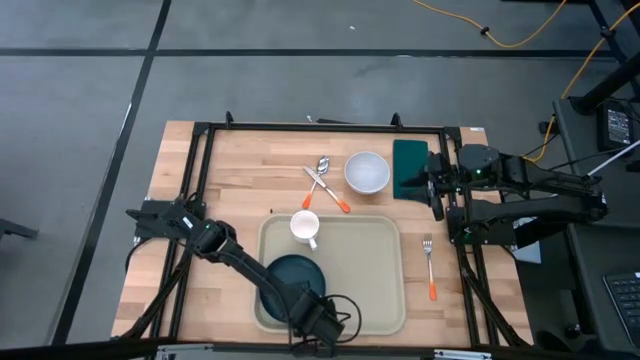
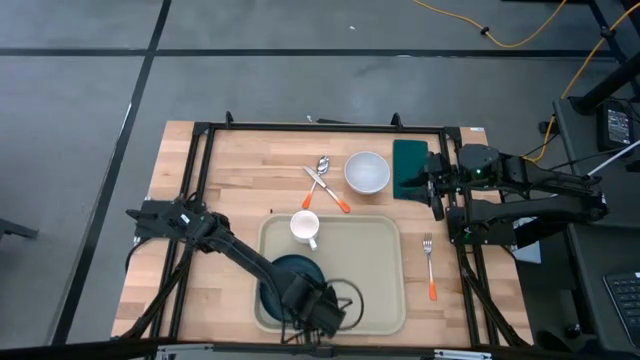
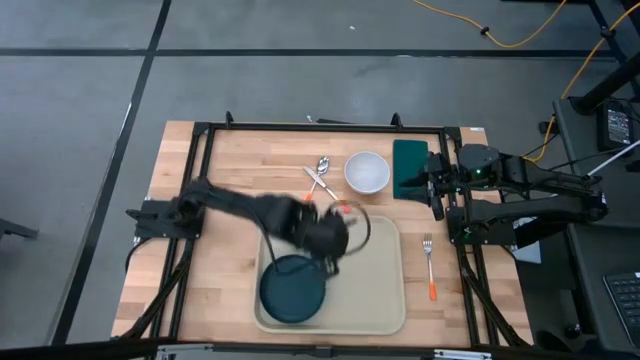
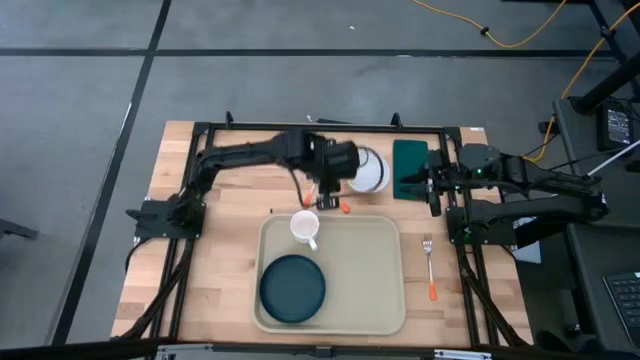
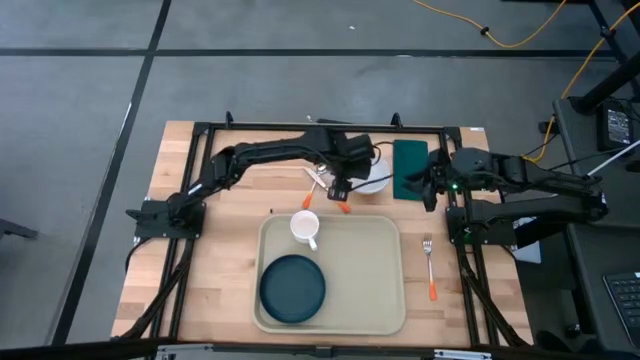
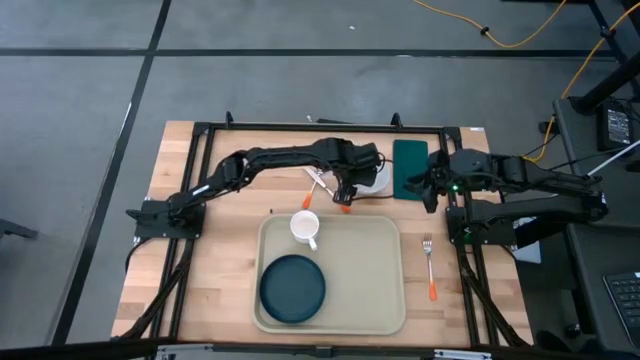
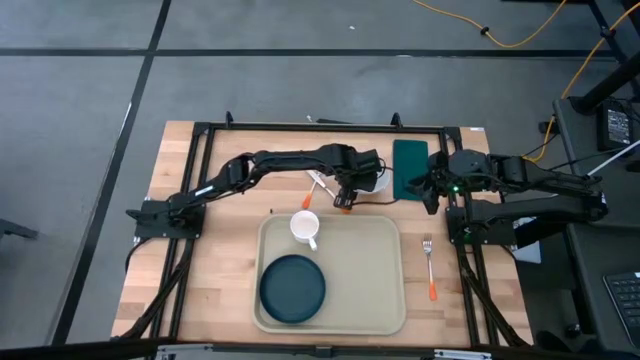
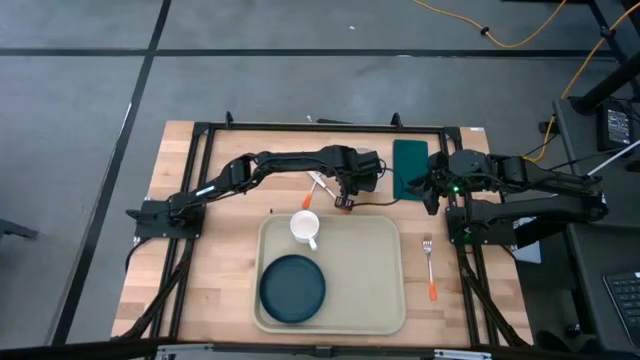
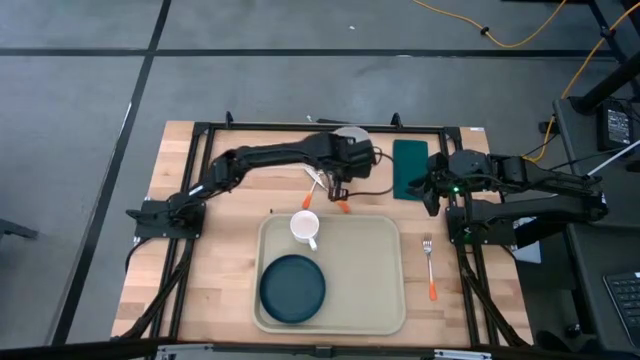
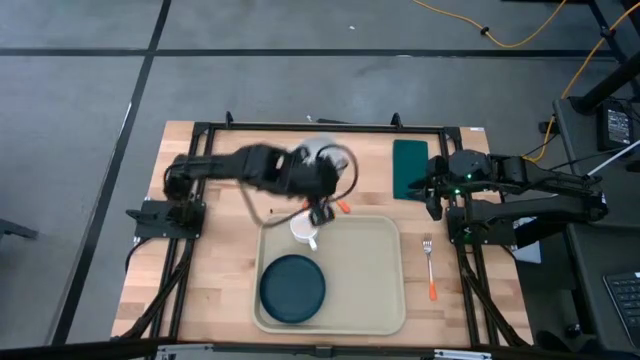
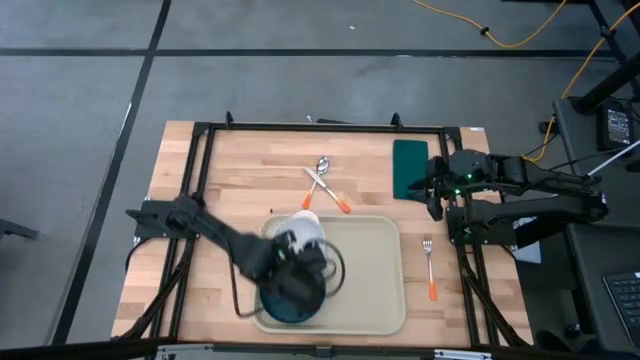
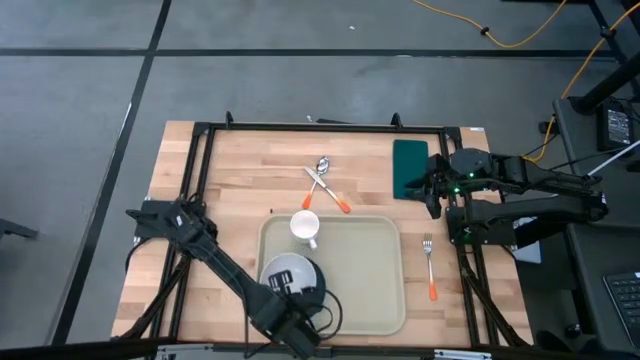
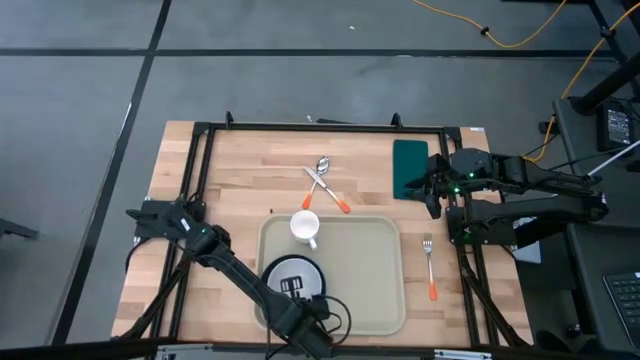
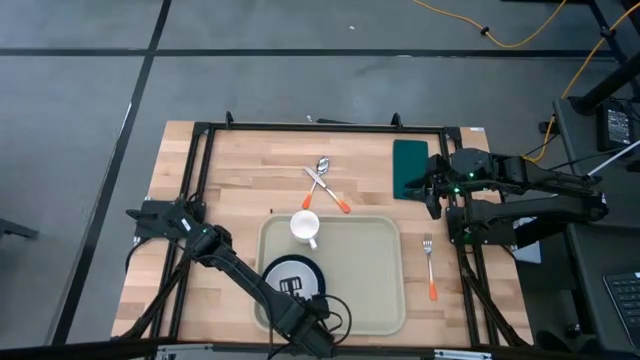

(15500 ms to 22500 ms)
Task: Set up tray
Put the white bowl on the black plate

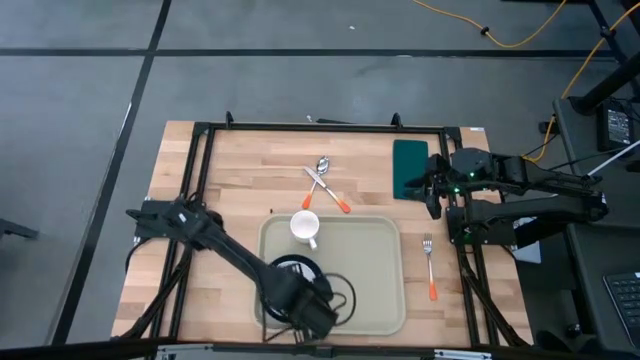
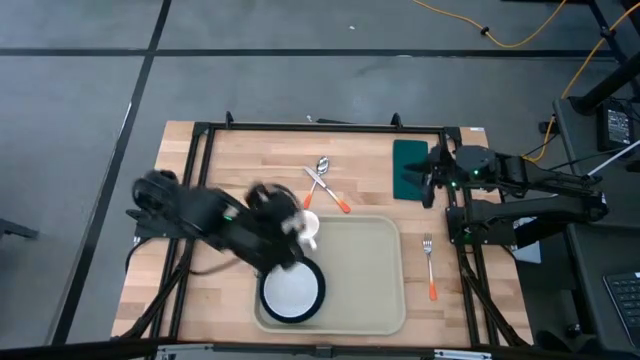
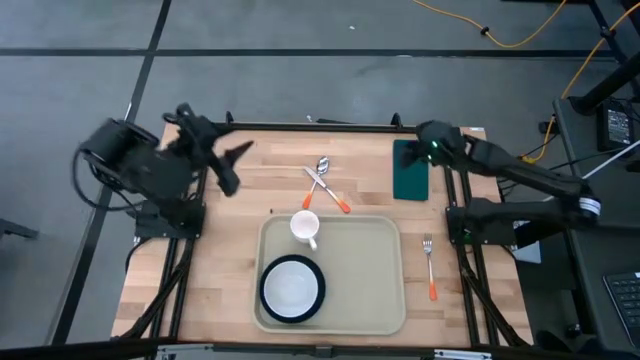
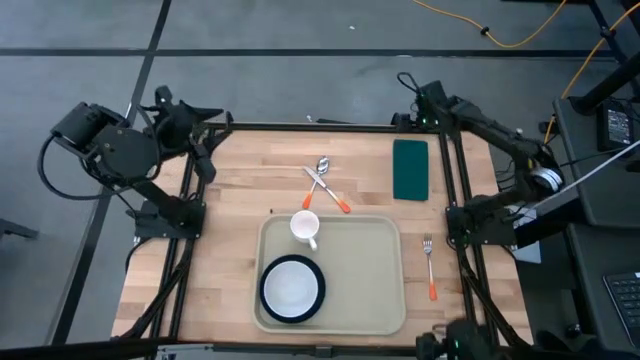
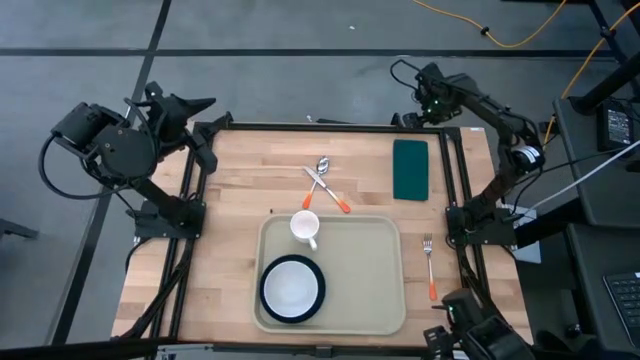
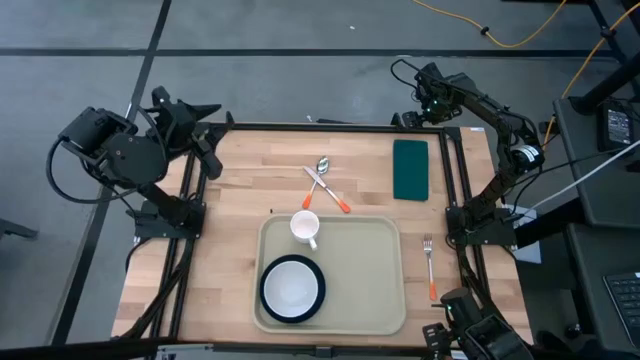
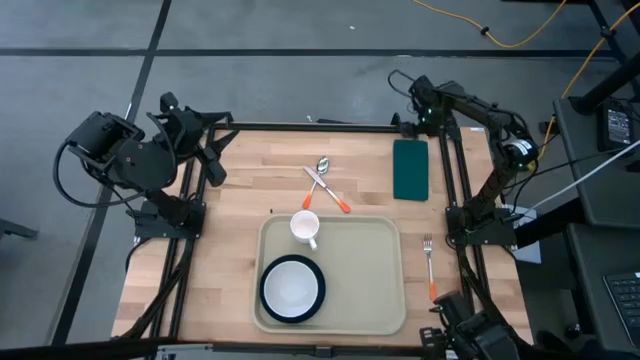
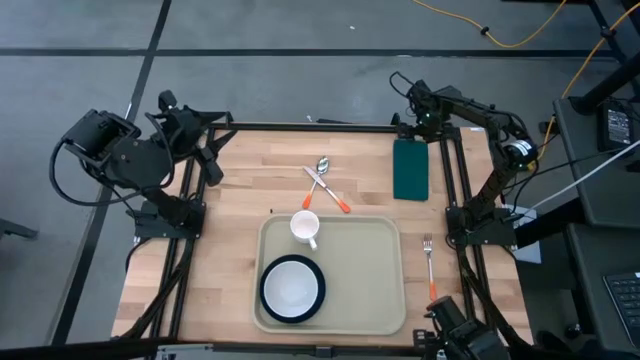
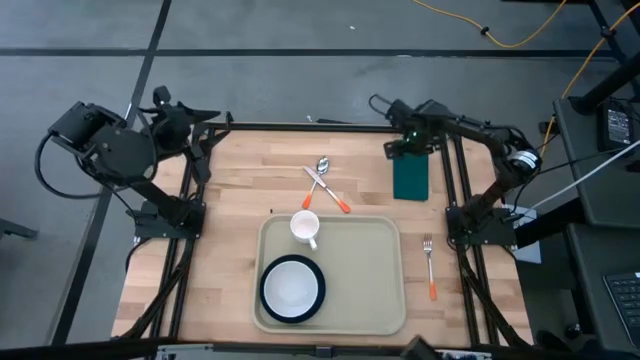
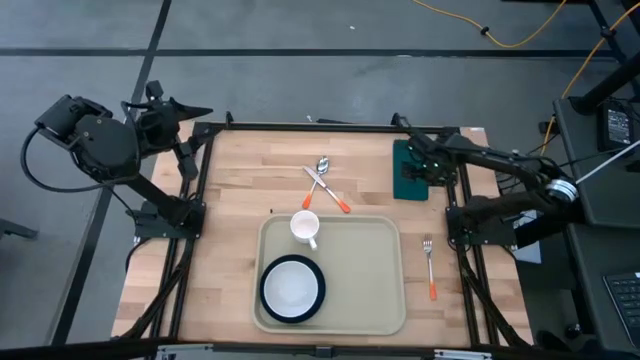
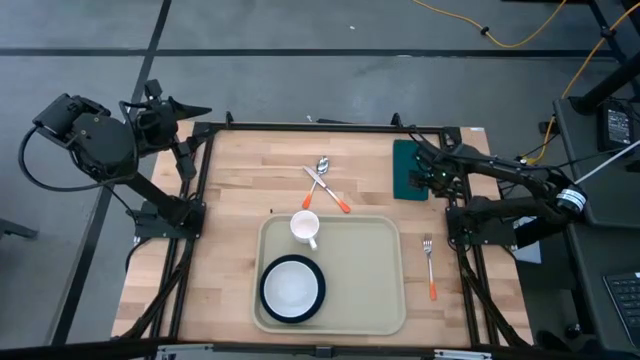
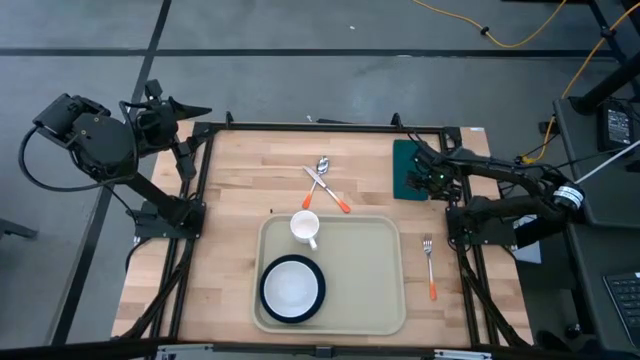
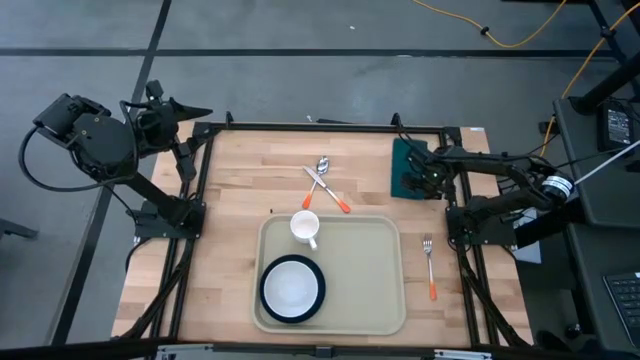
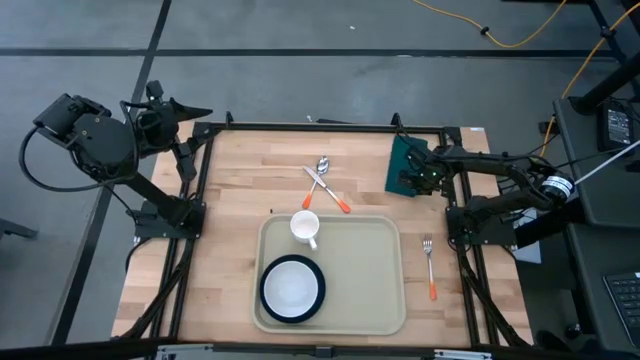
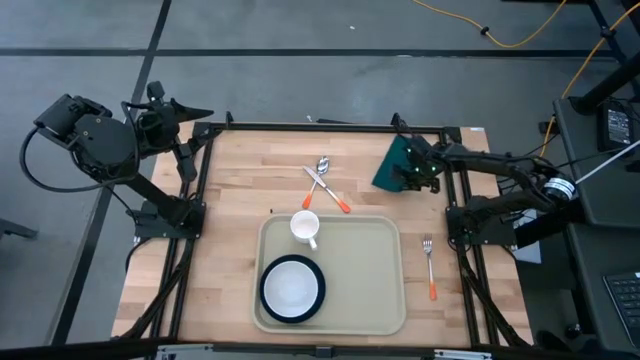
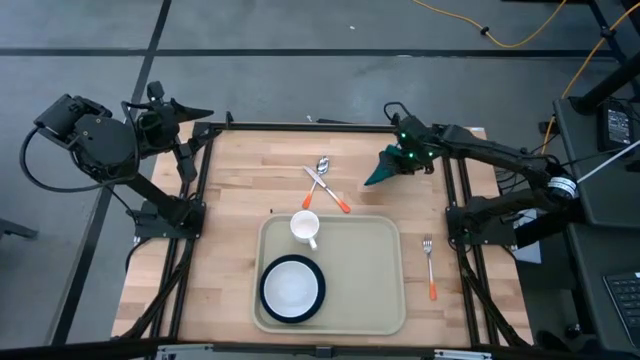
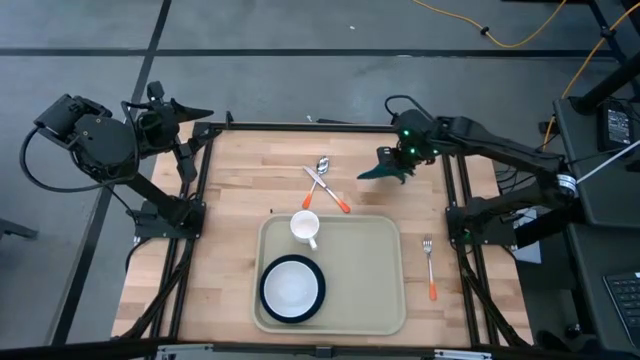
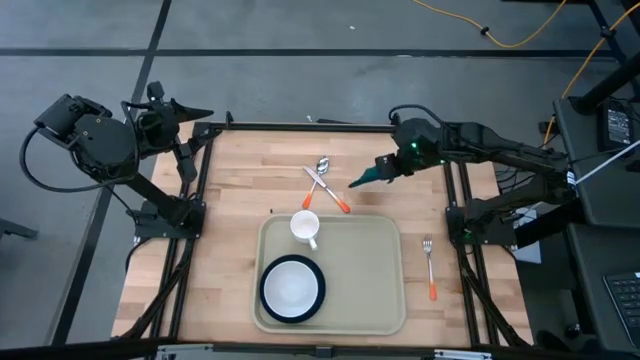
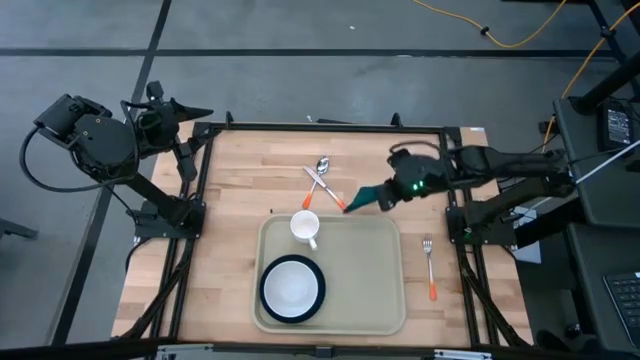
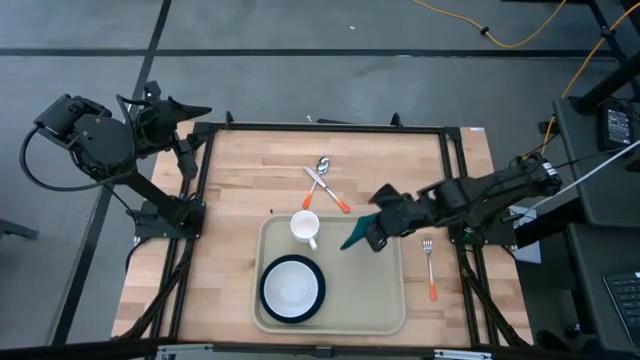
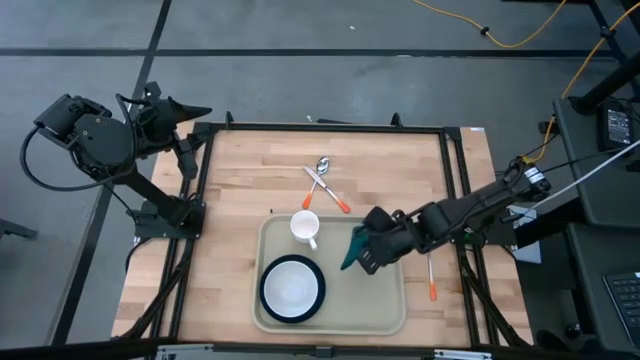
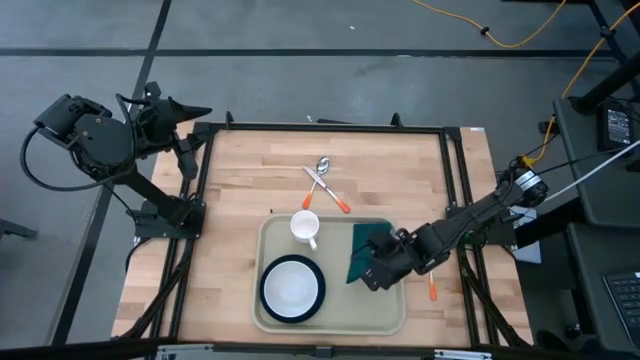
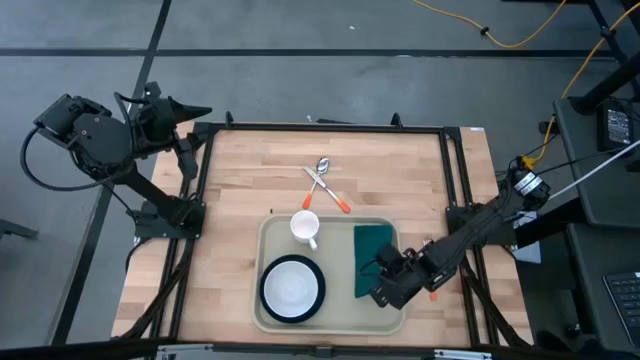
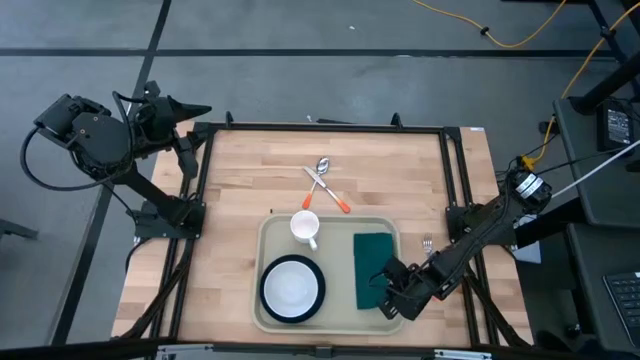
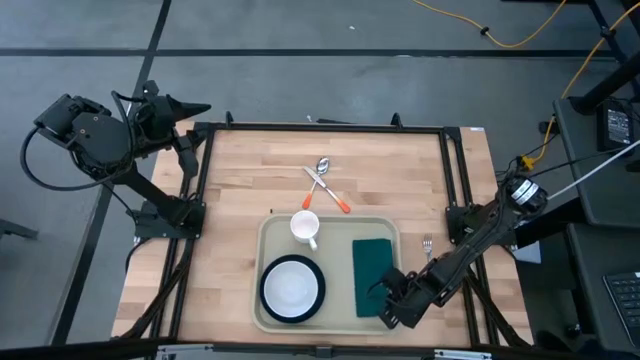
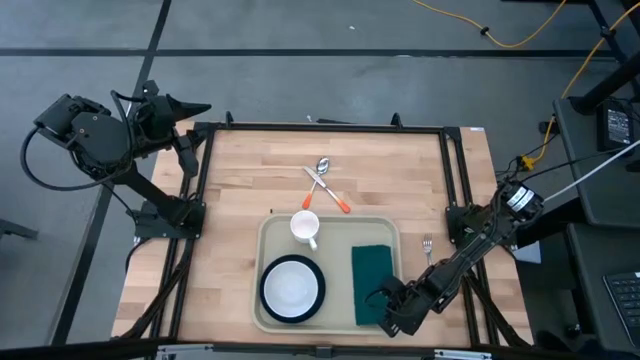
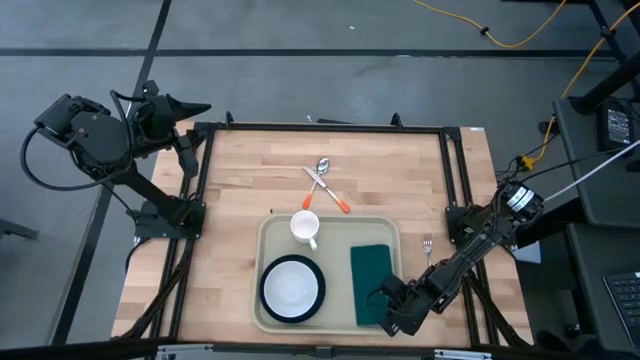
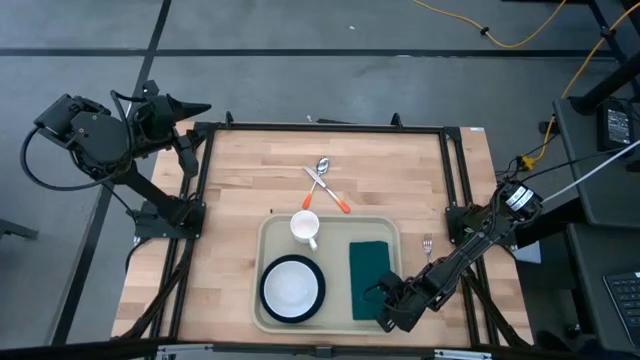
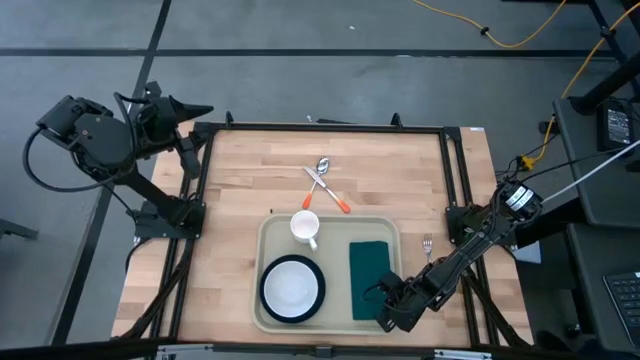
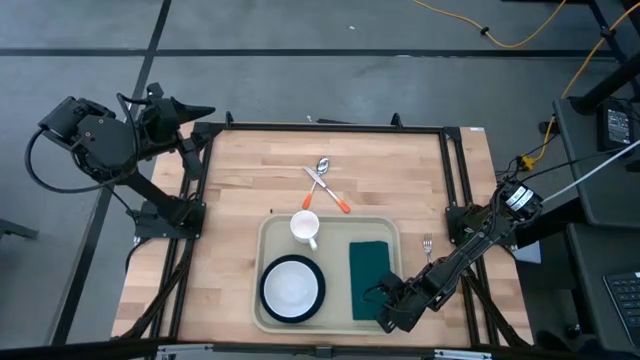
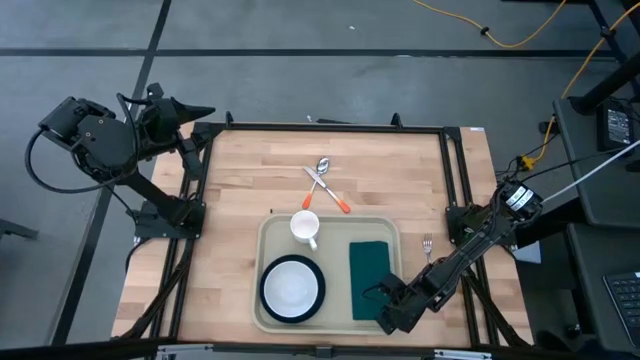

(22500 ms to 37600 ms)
Put the dark green napkin on the light brown serving tray to the right of the black plate
